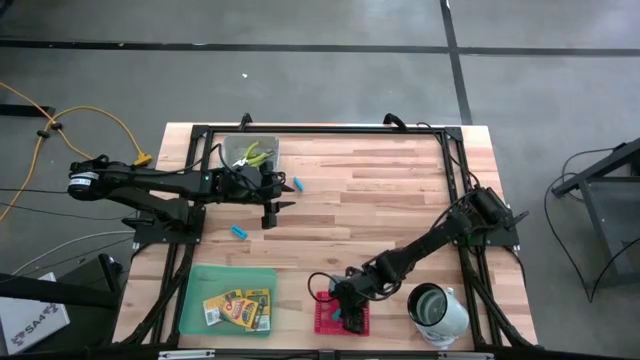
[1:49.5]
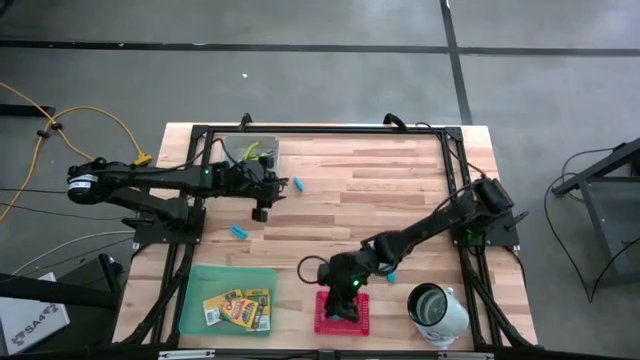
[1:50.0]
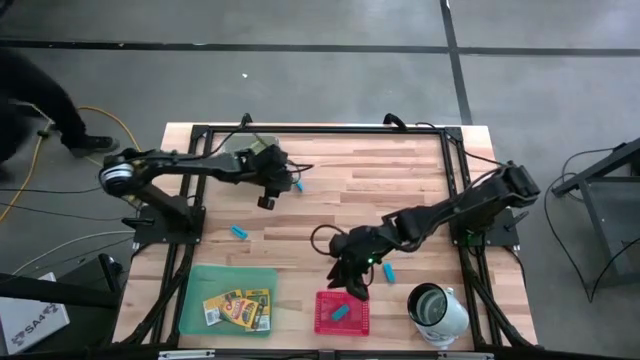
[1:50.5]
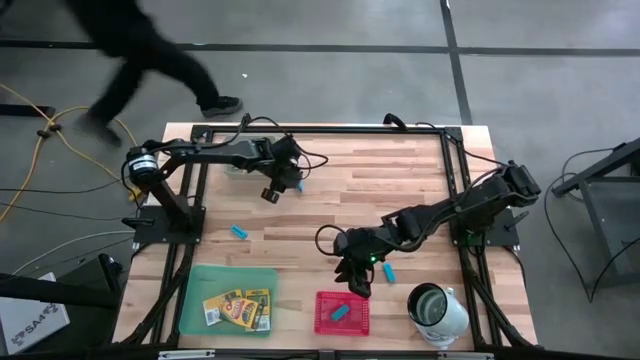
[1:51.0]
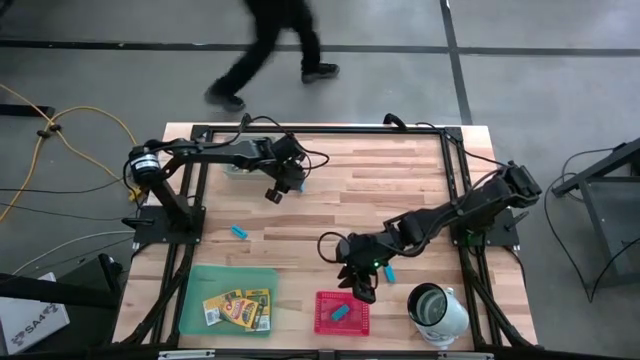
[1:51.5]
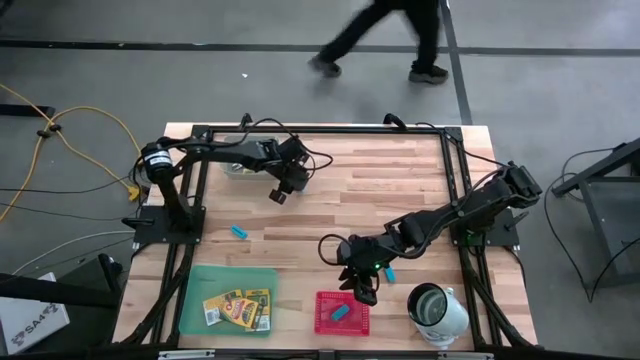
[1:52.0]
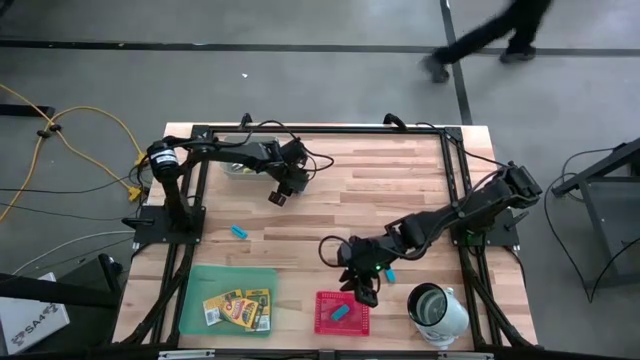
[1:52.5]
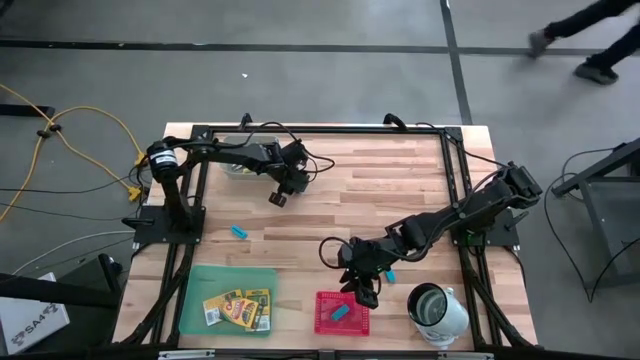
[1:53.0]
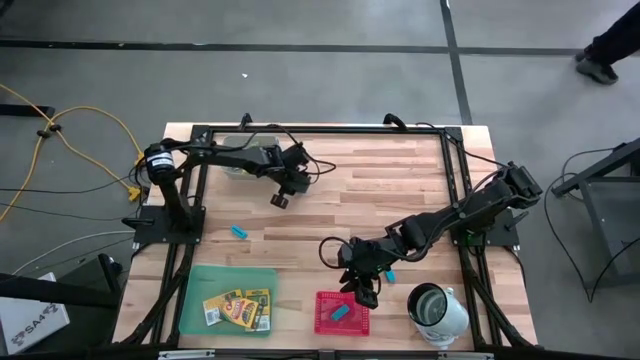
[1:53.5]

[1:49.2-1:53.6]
Task: Pick & Place School Supplies
Put the blue eraser into the red bin

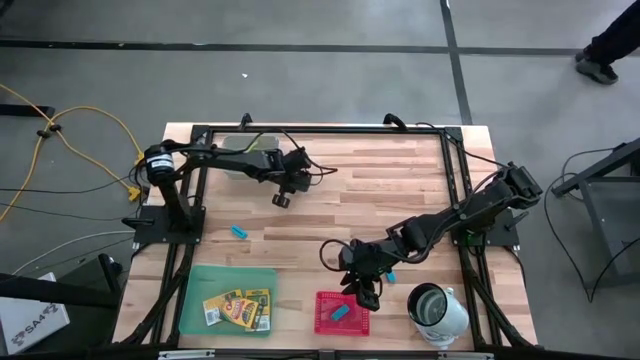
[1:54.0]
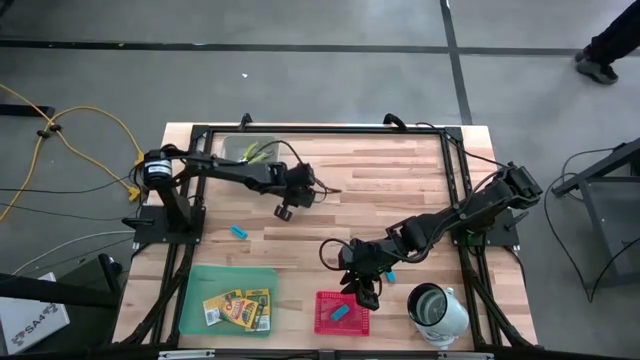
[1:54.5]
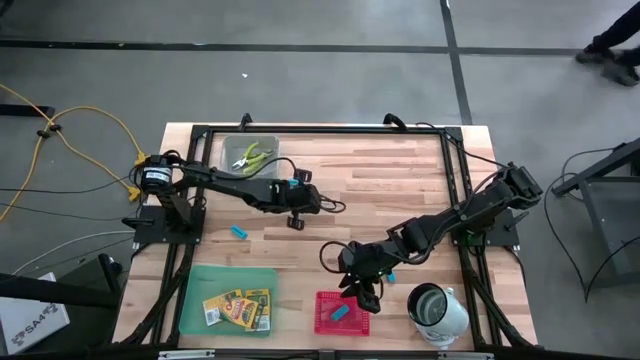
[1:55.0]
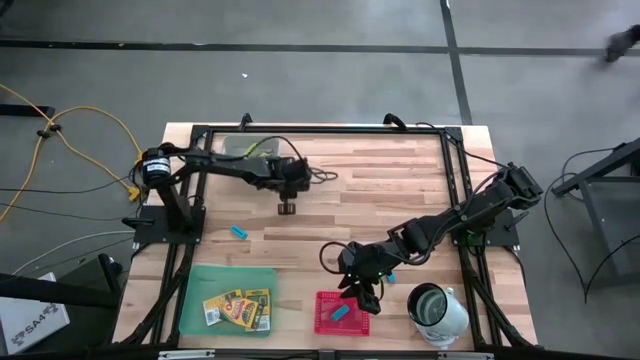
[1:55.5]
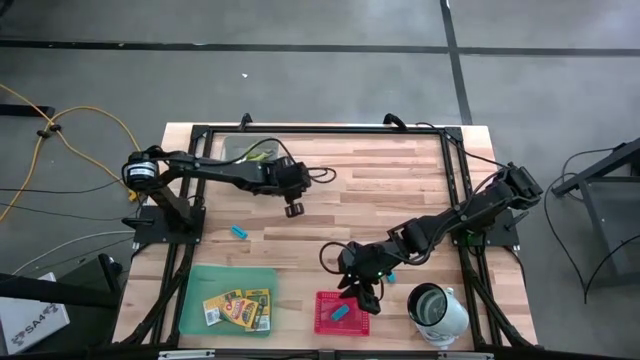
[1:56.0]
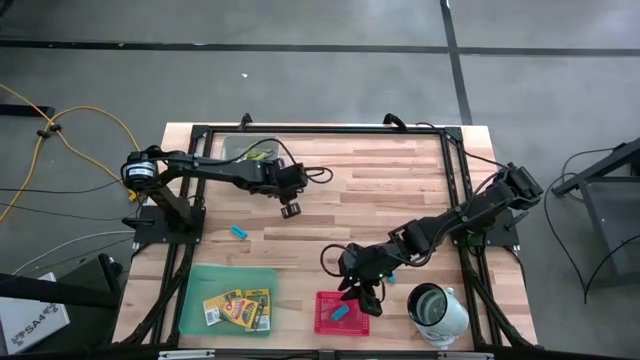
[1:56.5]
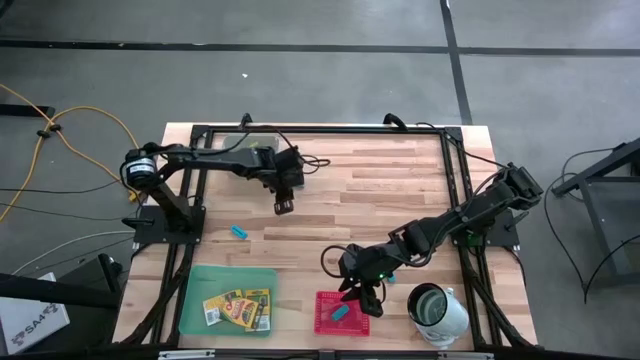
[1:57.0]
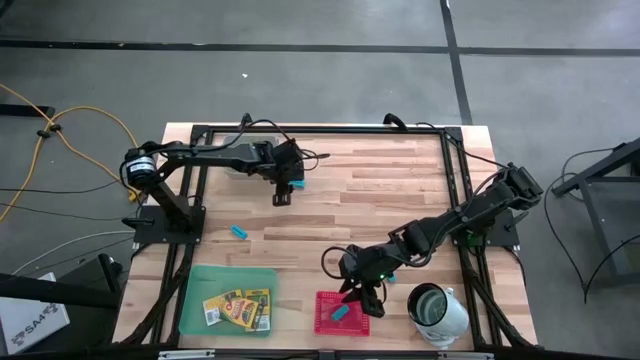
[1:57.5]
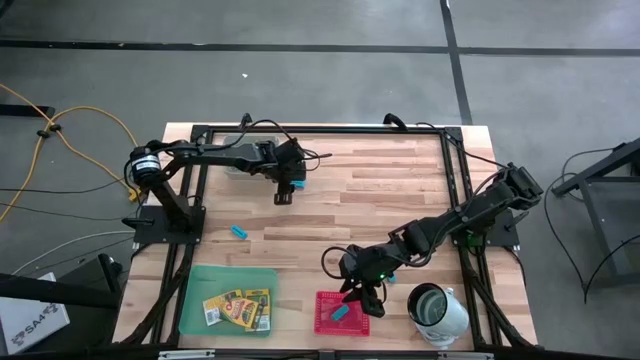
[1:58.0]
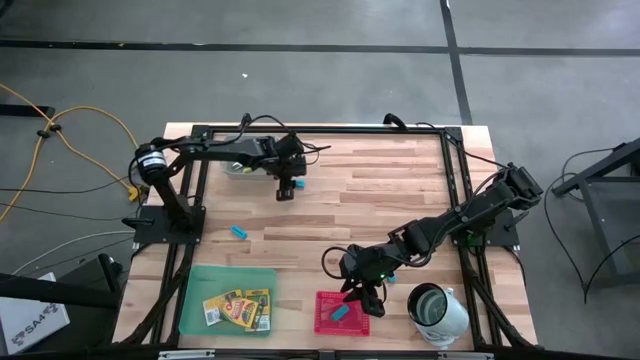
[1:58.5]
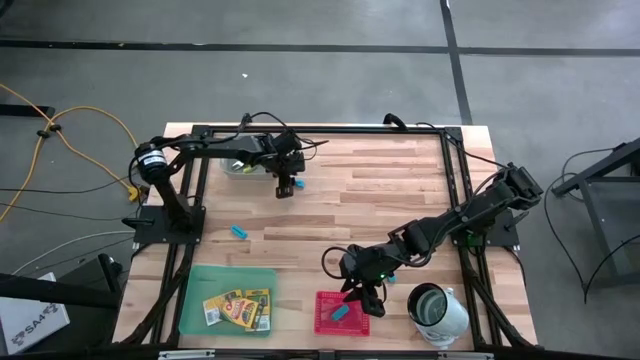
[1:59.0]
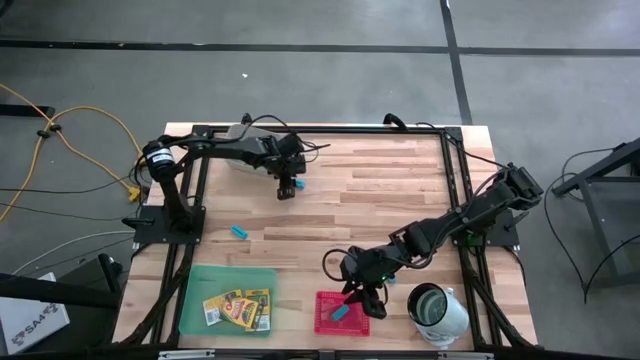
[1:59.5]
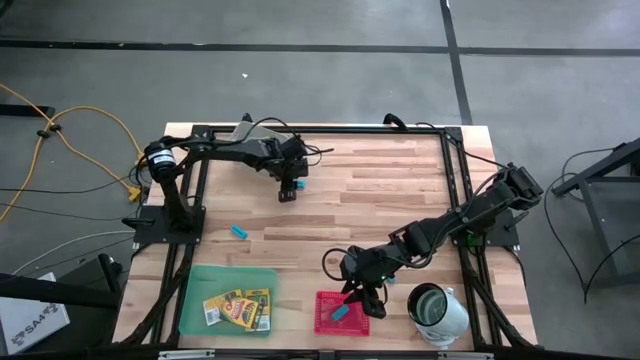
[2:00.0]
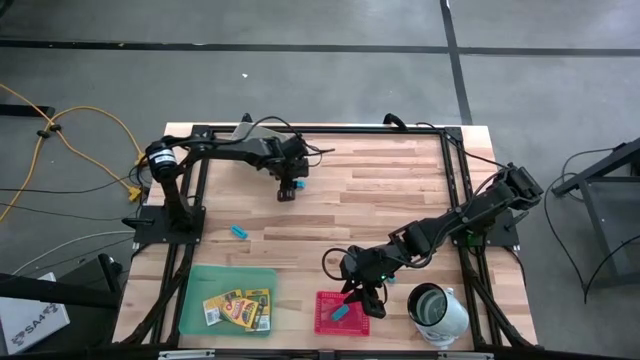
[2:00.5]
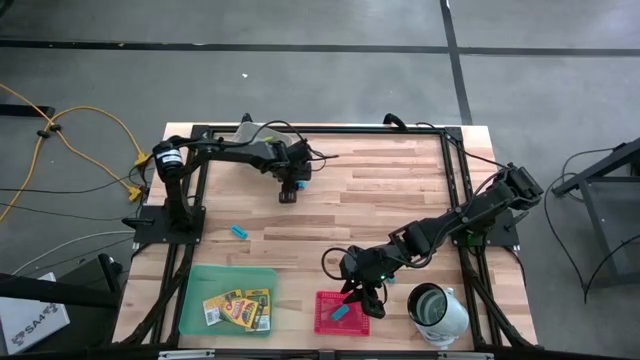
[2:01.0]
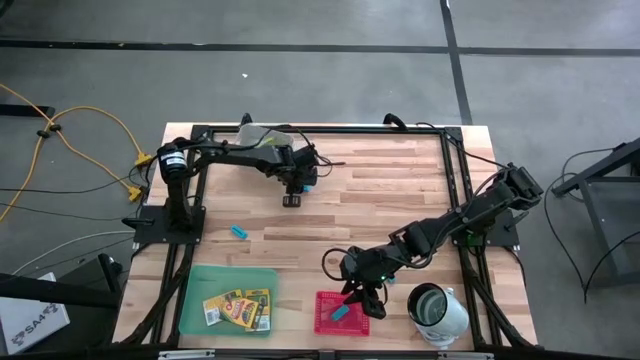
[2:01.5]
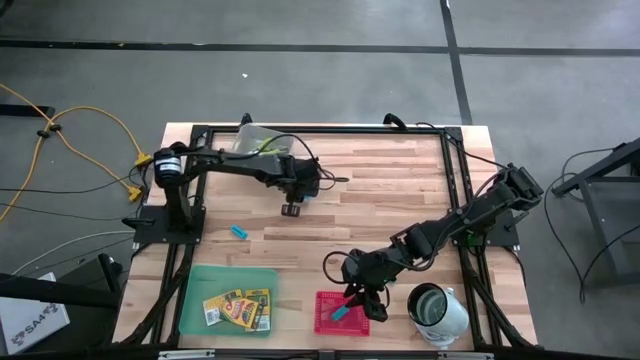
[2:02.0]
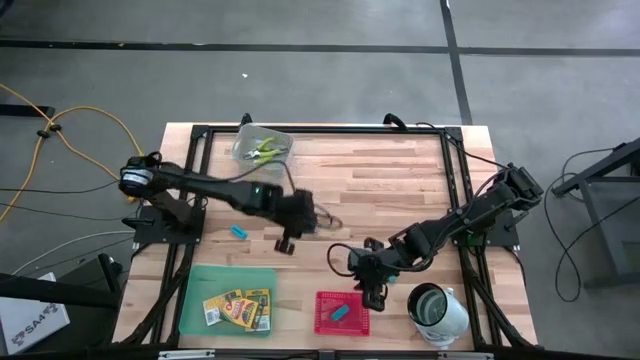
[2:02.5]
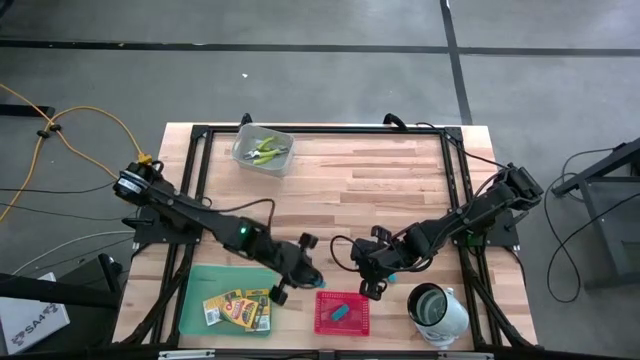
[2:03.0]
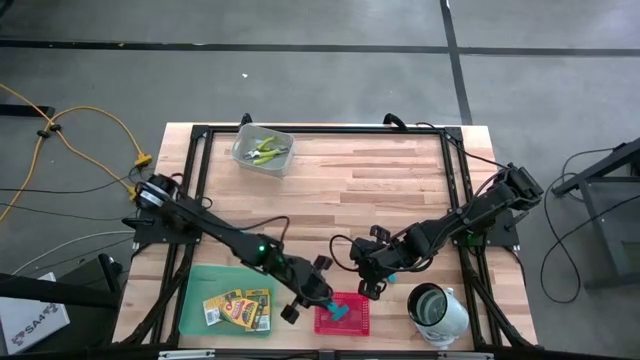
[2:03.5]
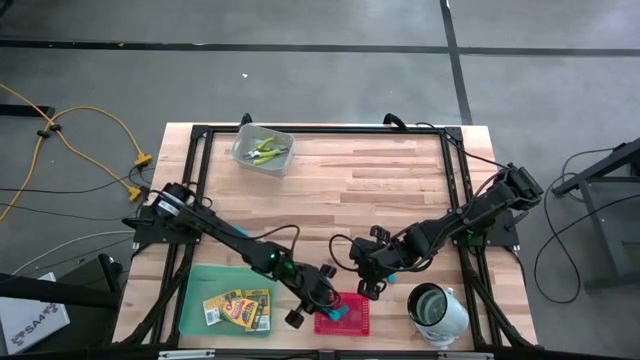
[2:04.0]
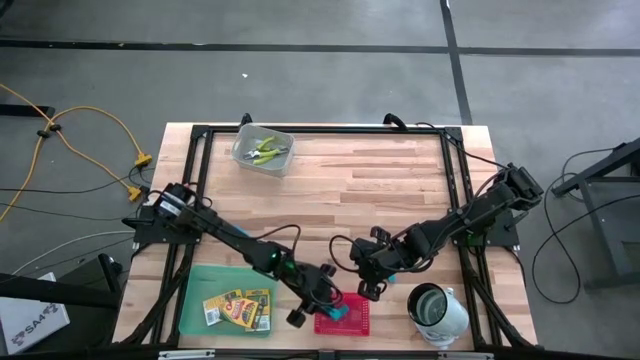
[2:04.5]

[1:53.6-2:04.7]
Put the blue eraser into the red bin

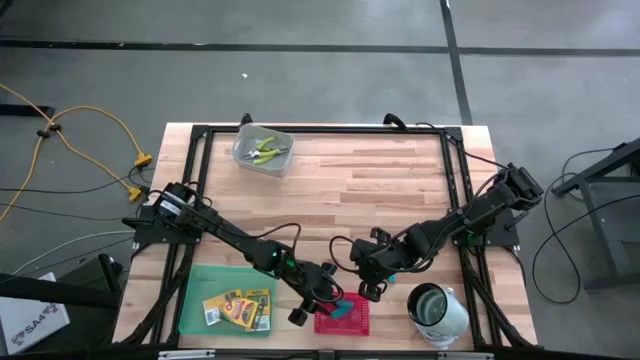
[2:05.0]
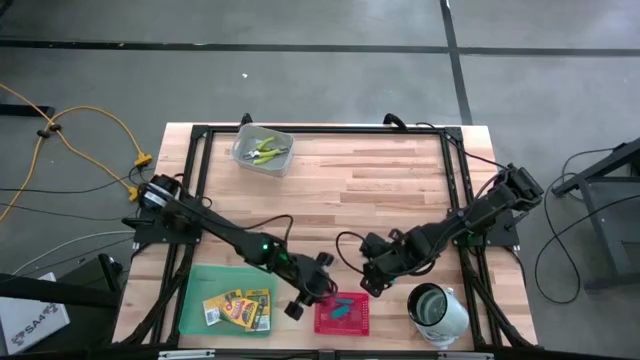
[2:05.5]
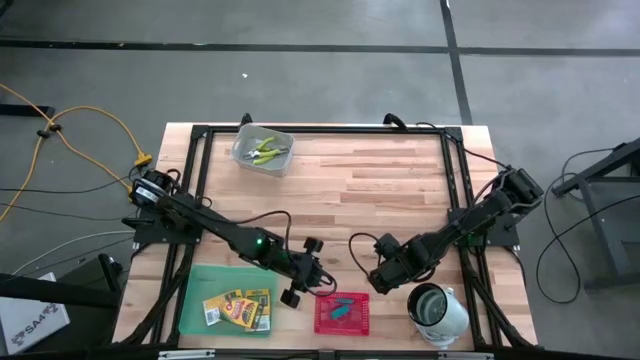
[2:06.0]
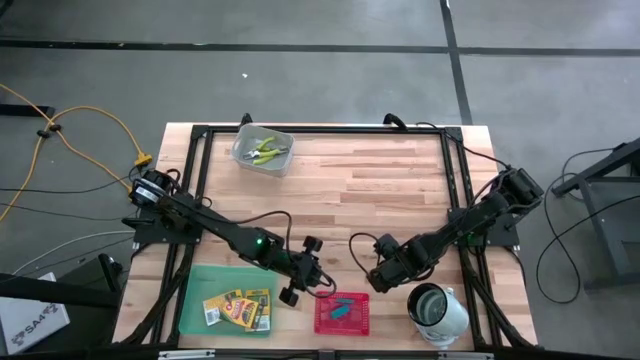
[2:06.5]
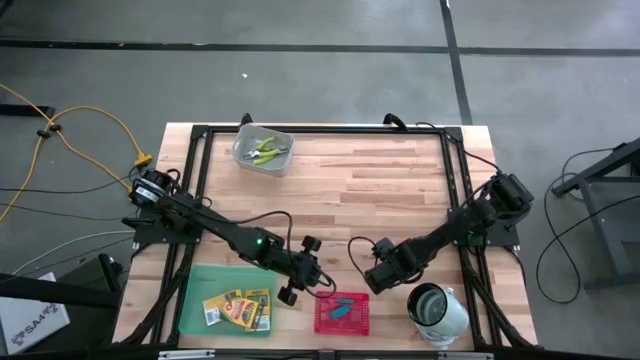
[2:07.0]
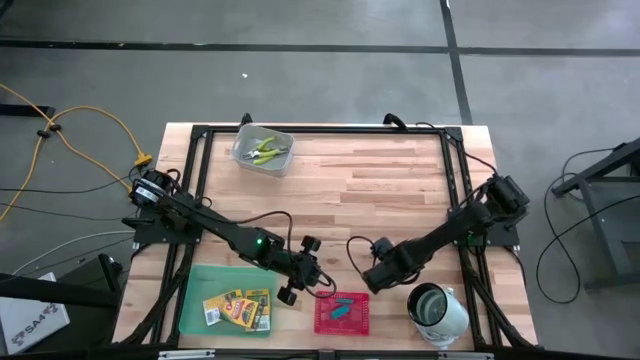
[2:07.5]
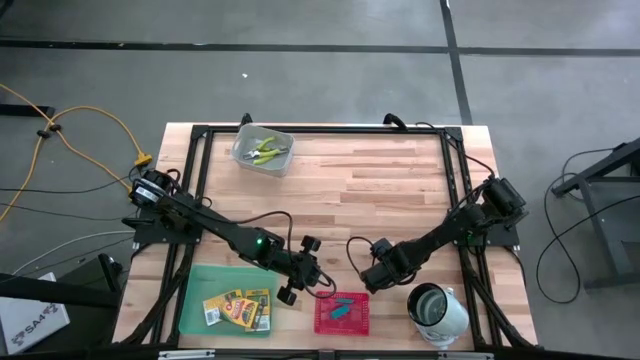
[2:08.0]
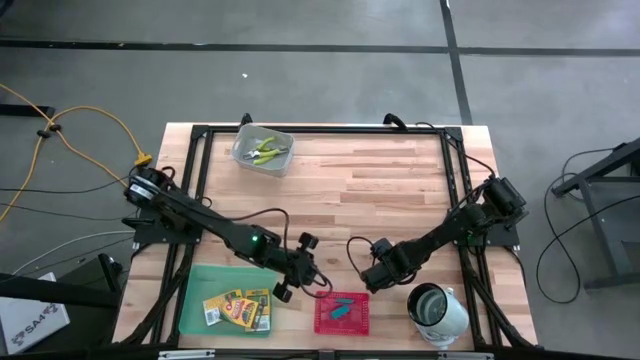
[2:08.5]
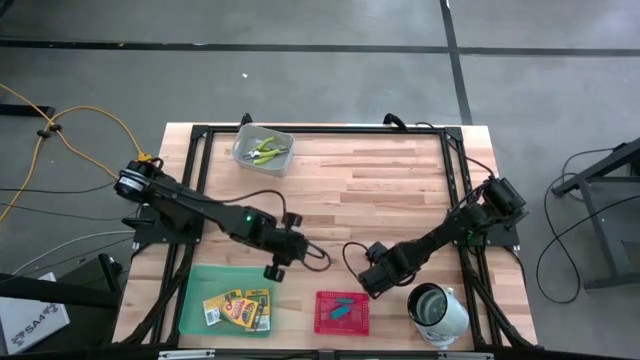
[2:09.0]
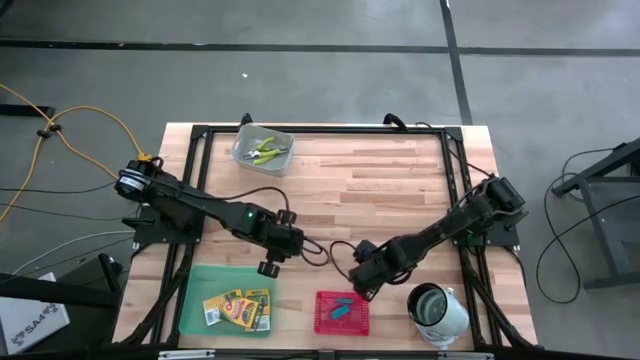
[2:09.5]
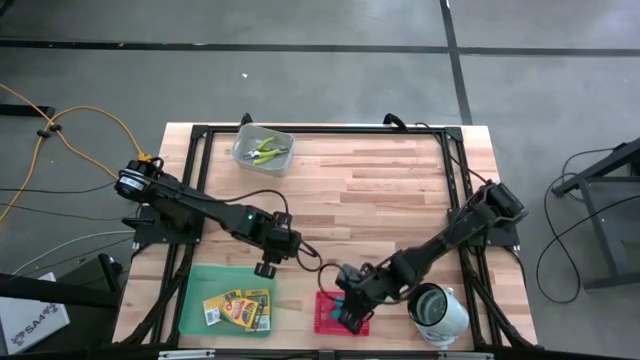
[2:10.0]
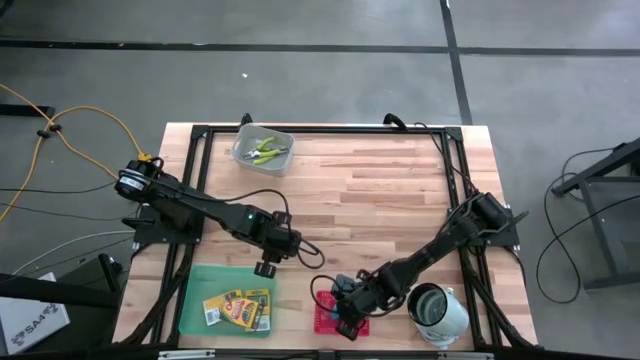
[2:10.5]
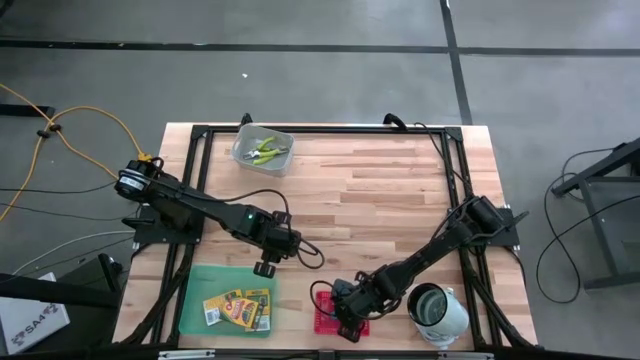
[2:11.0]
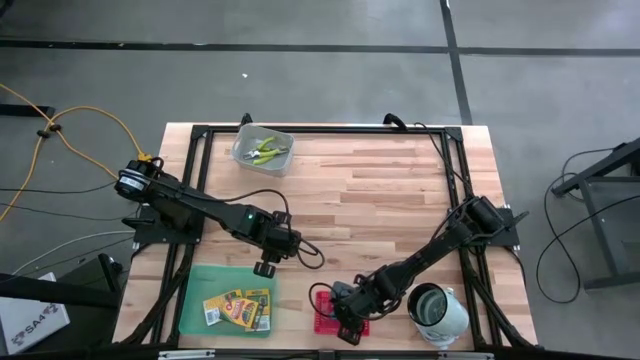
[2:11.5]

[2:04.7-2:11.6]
Put the blue eraser into the red bin
